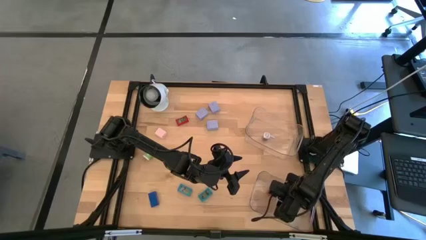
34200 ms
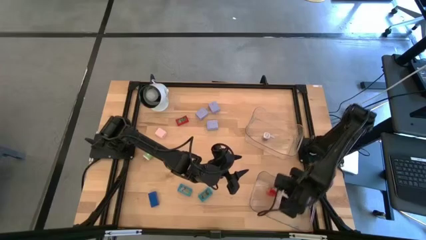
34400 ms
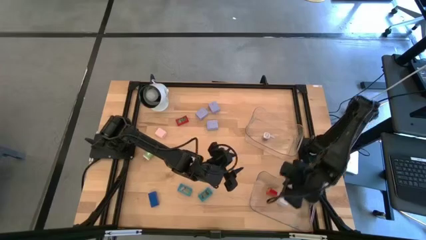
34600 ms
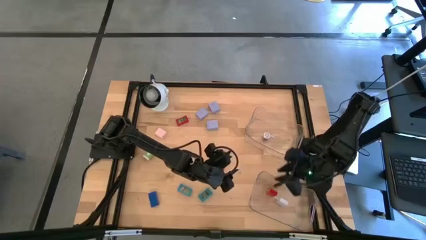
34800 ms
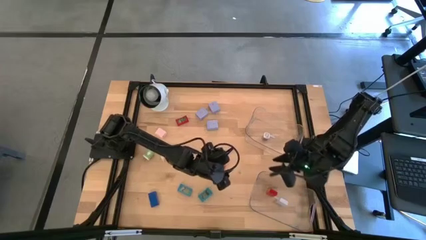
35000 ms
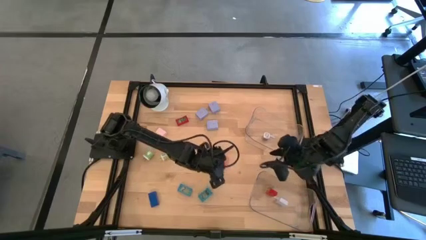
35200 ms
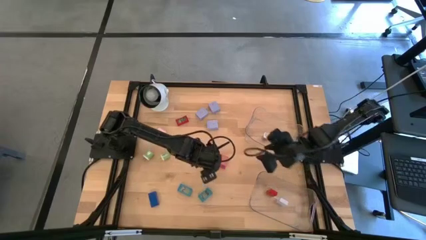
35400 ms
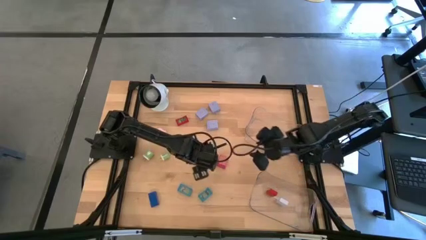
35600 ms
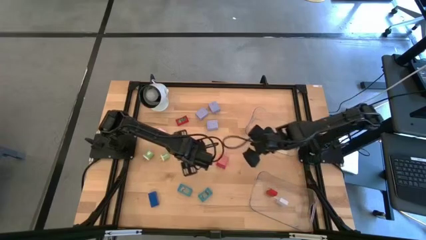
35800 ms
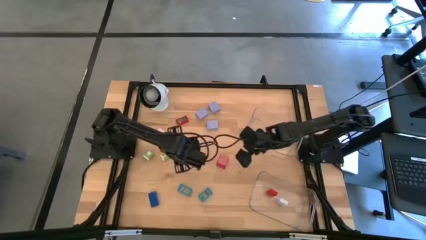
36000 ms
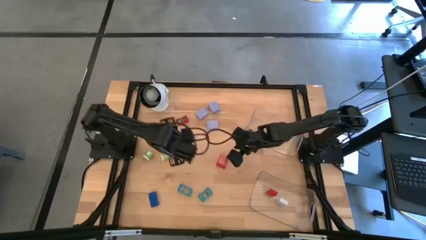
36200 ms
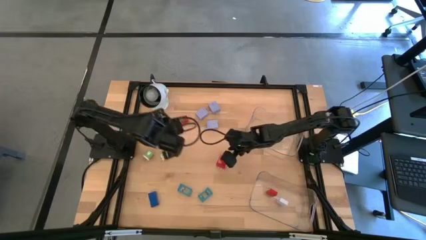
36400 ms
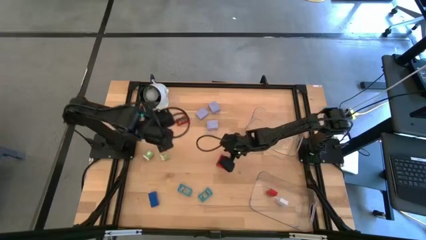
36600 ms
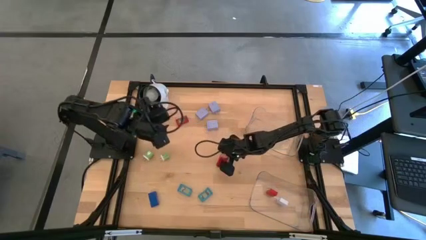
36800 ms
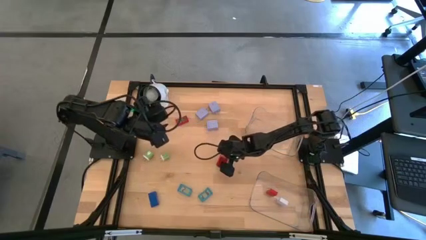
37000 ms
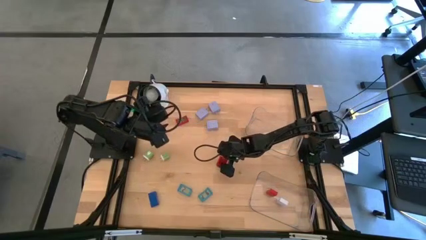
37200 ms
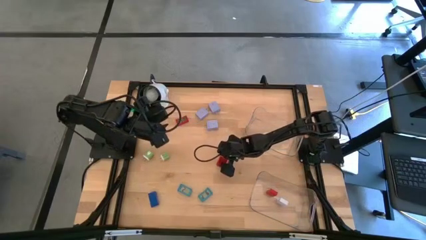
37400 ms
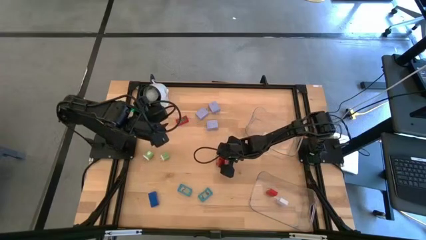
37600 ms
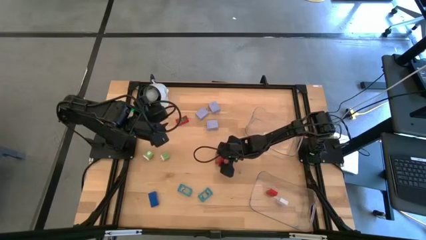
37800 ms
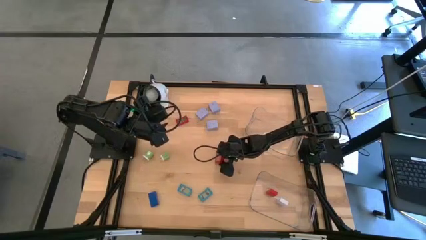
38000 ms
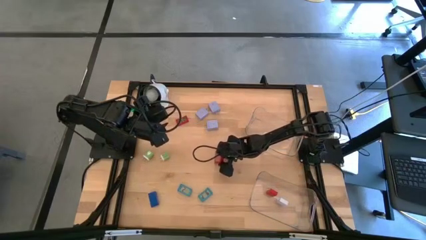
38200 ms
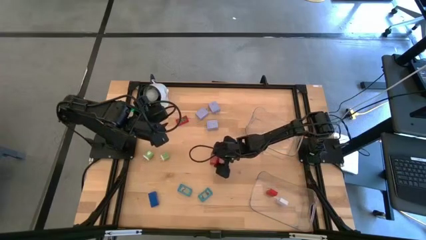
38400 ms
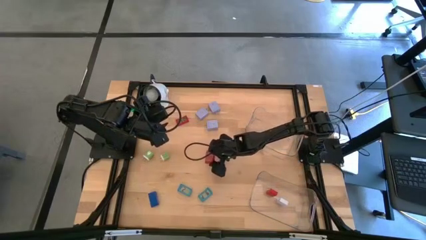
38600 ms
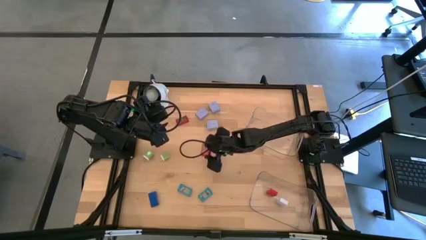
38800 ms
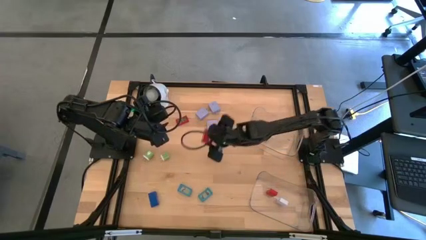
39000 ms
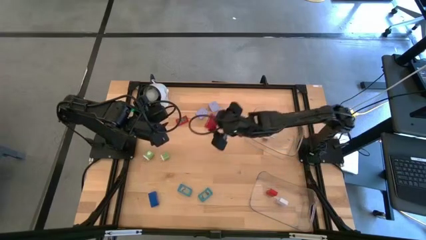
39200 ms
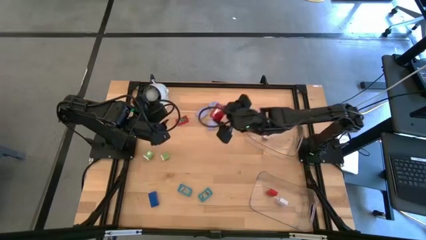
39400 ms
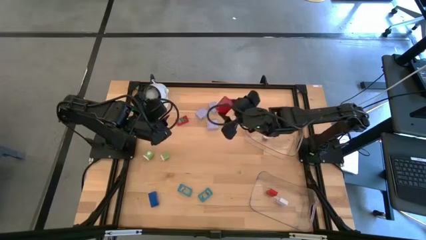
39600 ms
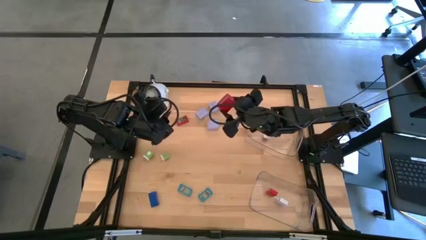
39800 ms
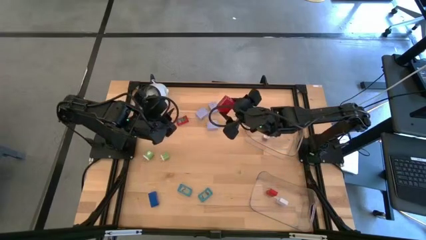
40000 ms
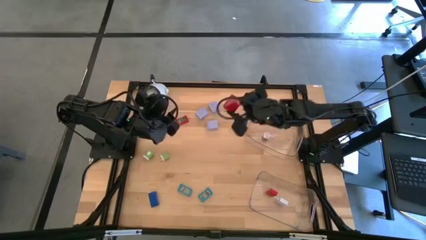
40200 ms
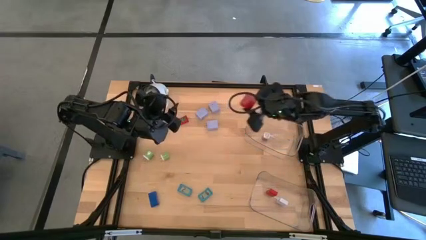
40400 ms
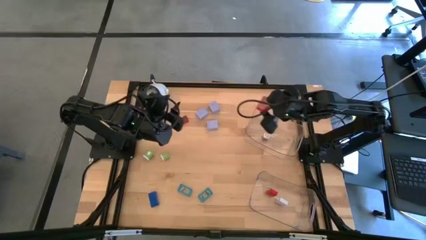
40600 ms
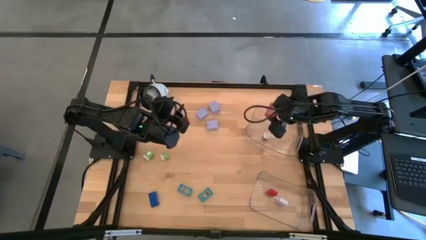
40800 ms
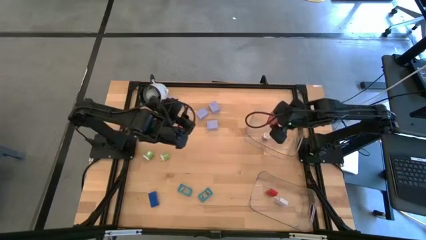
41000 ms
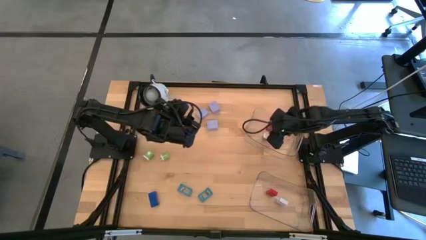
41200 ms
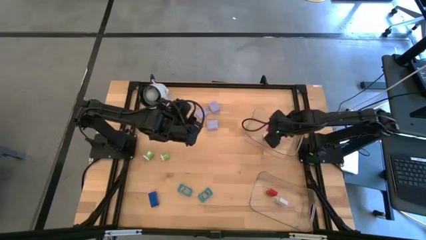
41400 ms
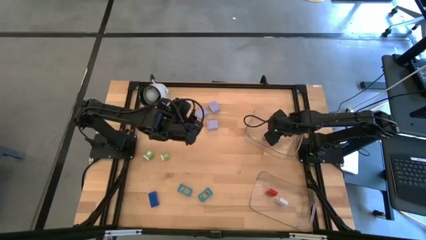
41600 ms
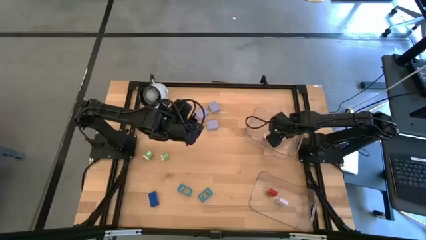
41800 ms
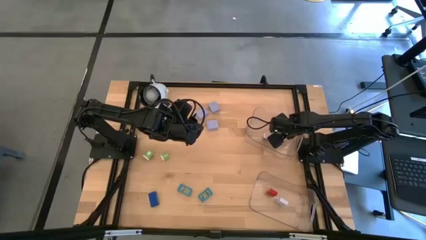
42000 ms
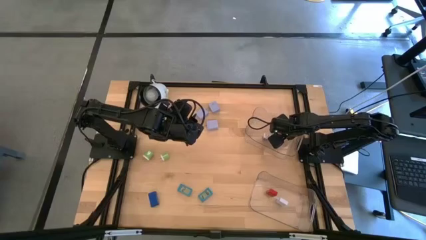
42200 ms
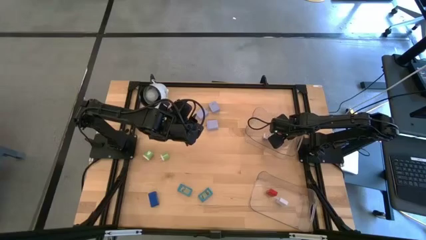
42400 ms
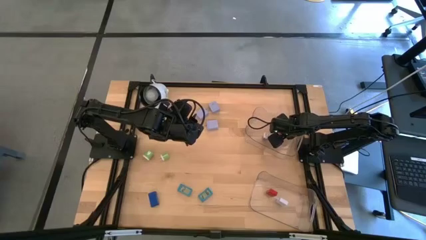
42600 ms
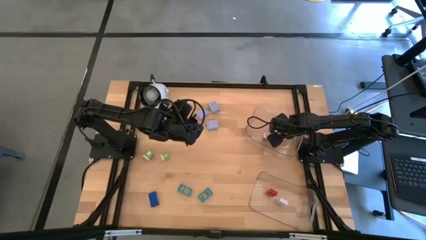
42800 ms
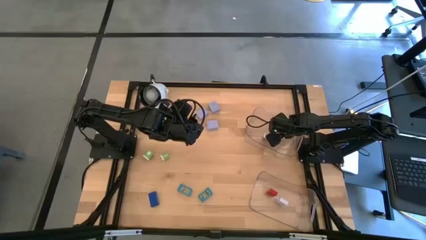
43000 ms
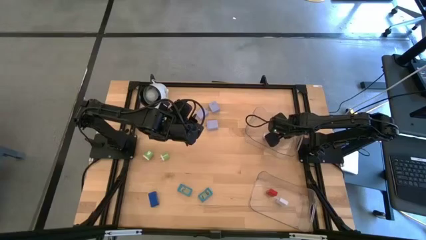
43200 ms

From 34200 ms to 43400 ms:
Task: Pick & Place Office items
Put the red charger adapter into the top transparent bin

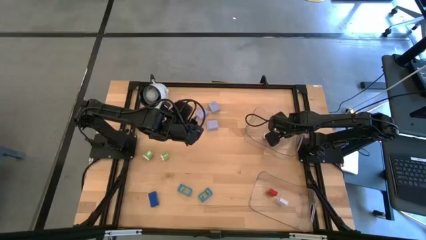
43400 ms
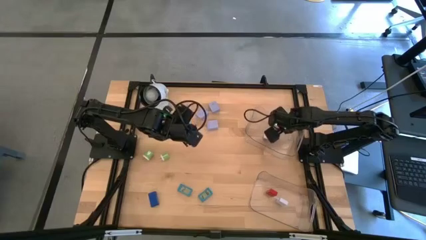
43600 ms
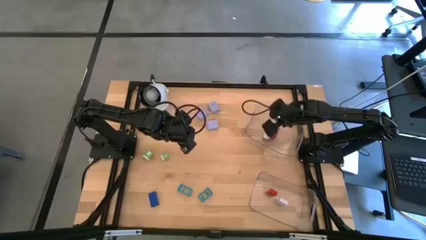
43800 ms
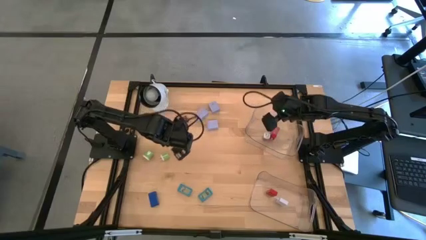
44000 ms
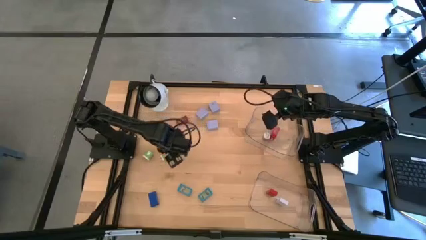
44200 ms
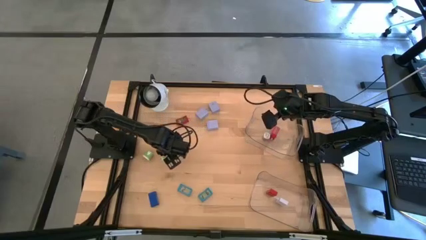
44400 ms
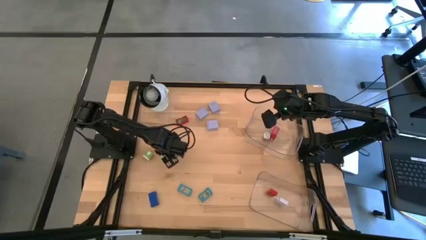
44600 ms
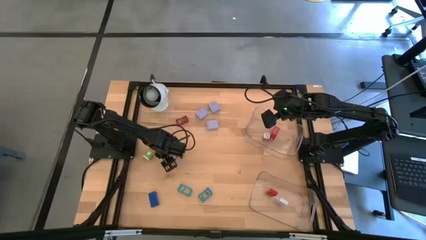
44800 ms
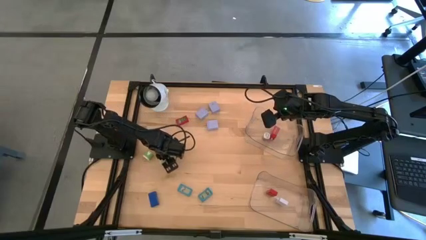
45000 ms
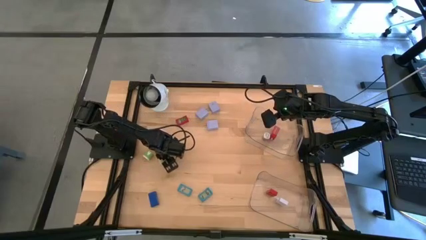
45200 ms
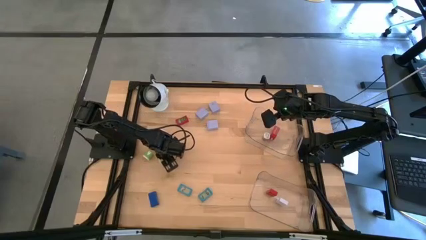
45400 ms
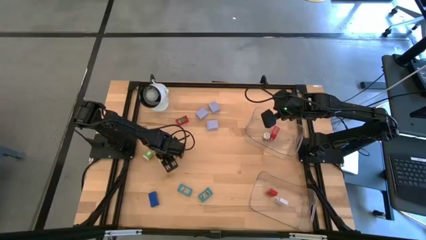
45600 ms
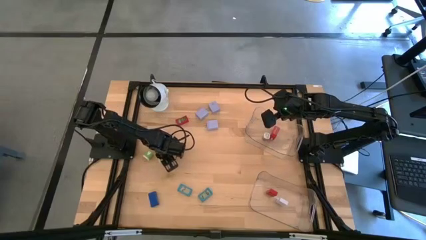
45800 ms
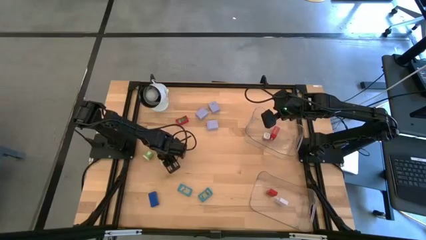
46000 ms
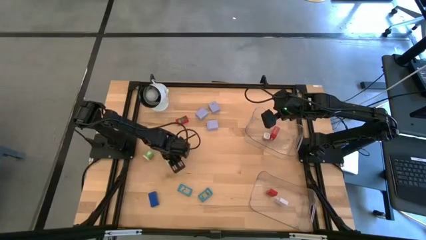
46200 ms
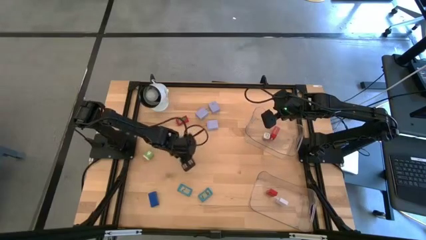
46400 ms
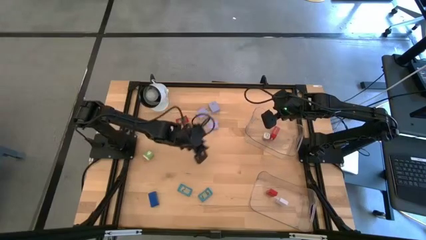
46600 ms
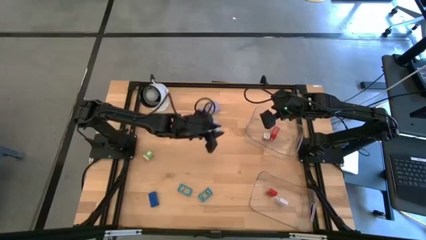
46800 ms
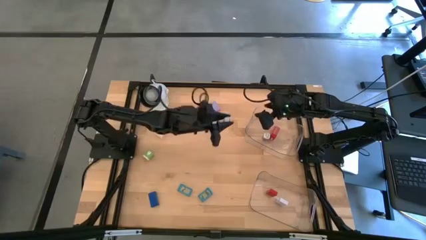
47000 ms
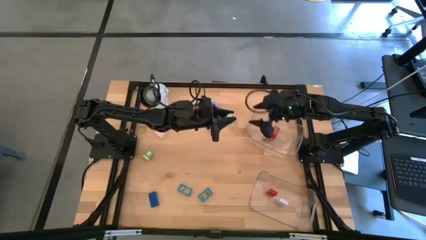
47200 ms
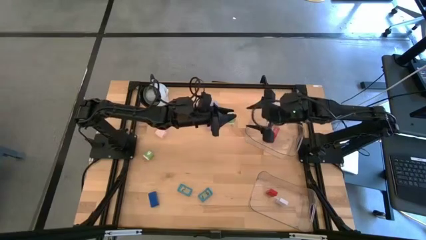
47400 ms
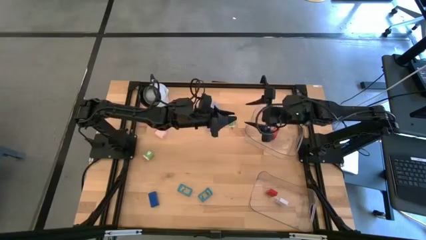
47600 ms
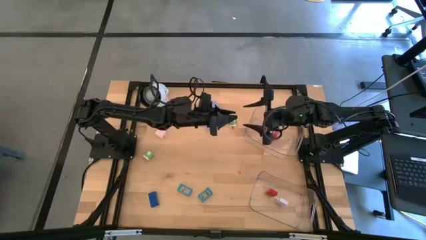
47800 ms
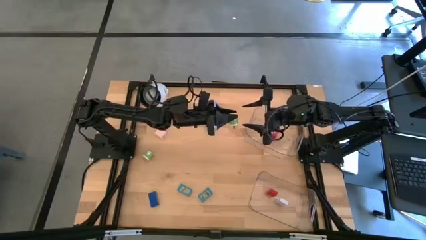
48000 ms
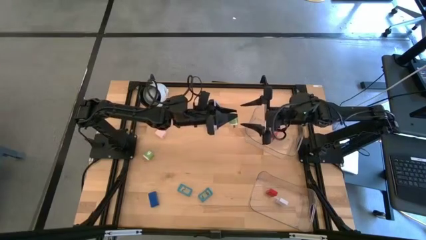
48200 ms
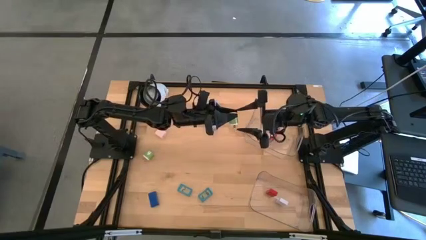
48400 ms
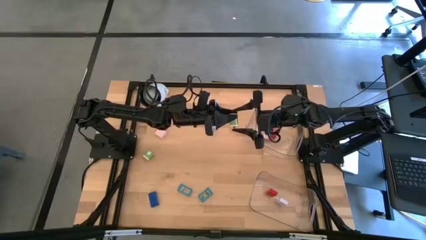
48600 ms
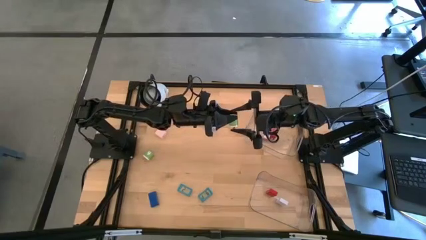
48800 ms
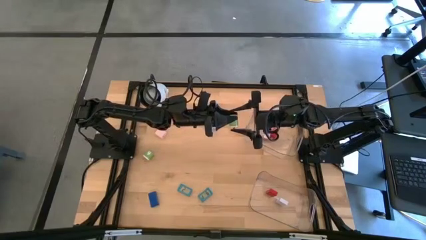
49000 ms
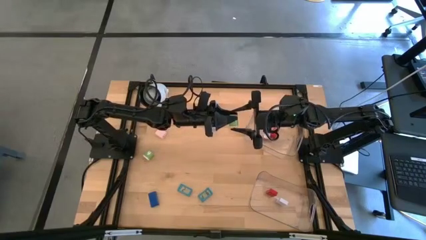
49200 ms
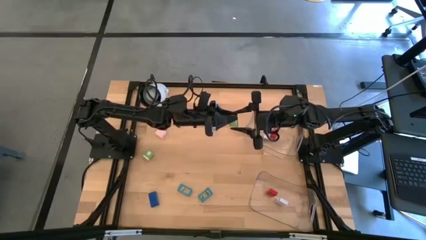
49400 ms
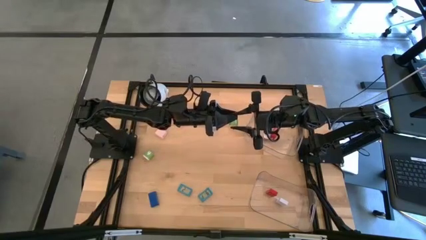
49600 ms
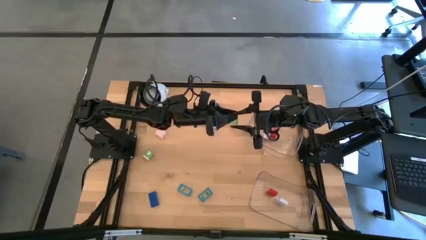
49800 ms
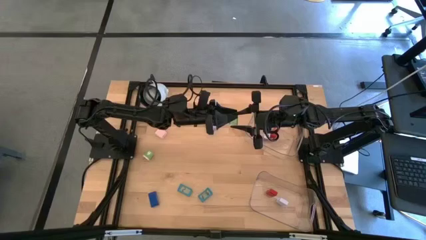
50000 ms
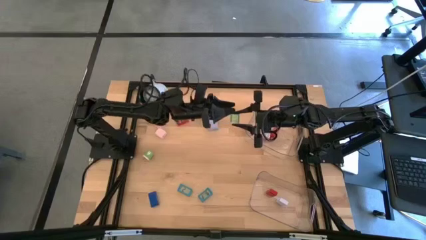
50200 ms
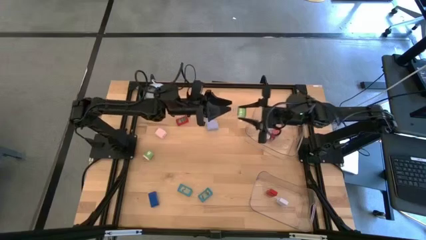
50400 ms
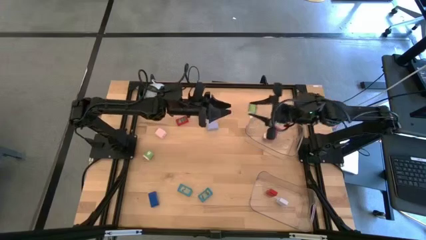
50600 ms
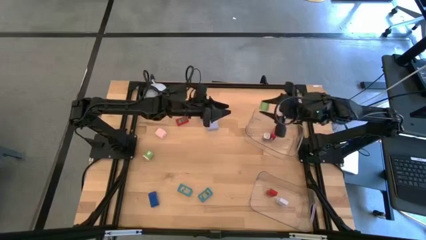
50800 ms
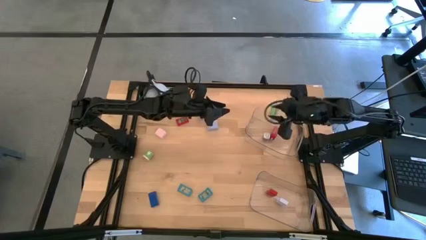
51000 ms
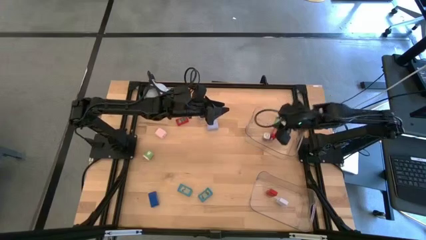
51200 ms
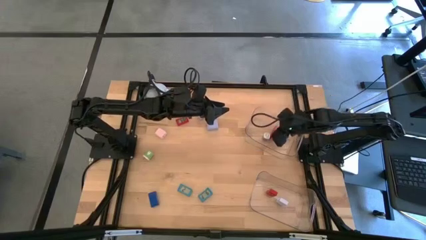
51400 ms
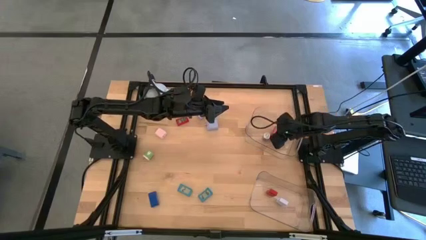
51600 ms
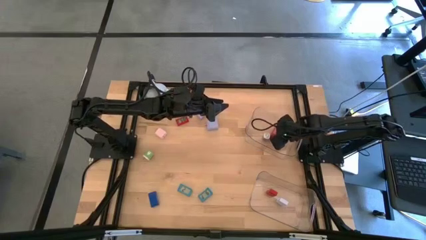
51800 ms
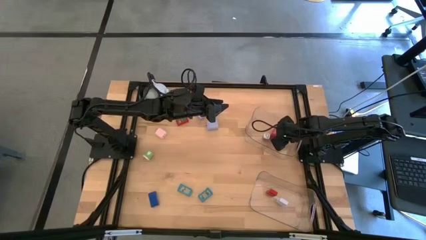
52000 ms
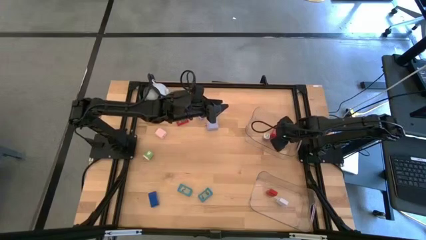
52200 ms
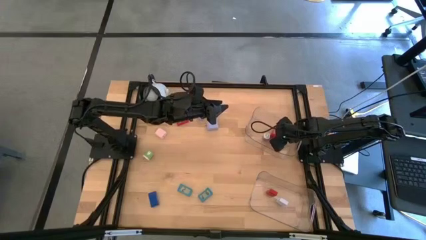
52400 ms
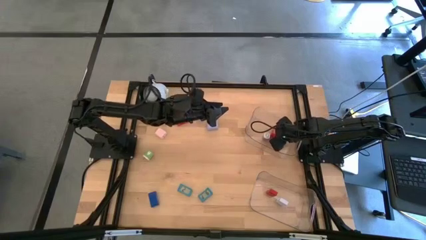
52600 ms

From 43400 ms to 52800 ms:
Put the right green charger adapter into the top transparent bin
